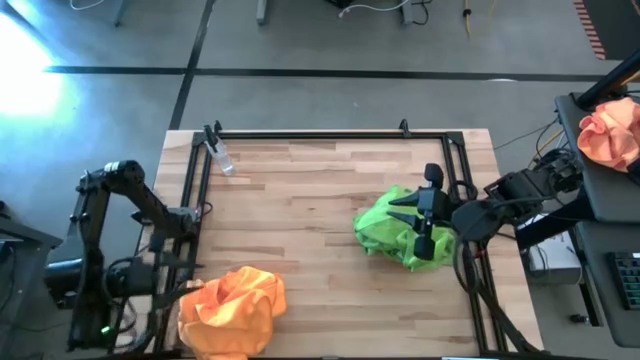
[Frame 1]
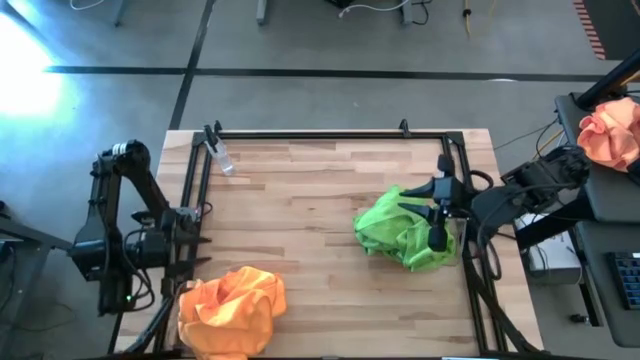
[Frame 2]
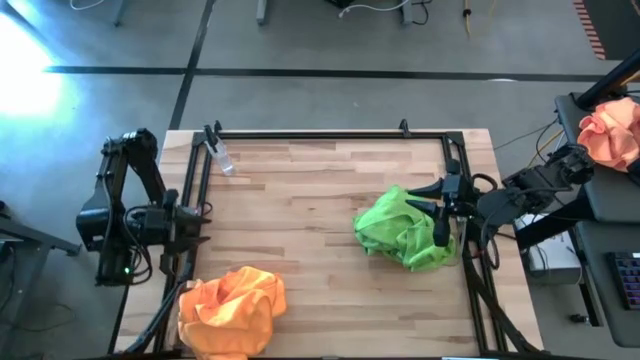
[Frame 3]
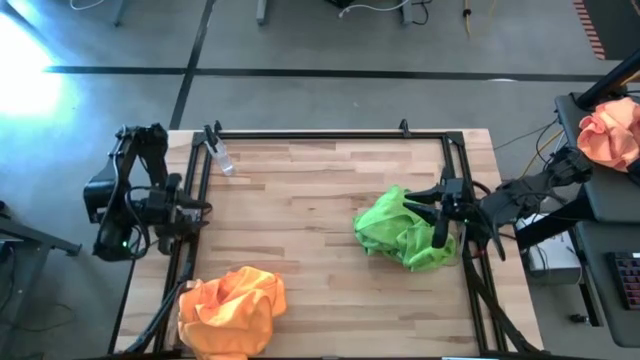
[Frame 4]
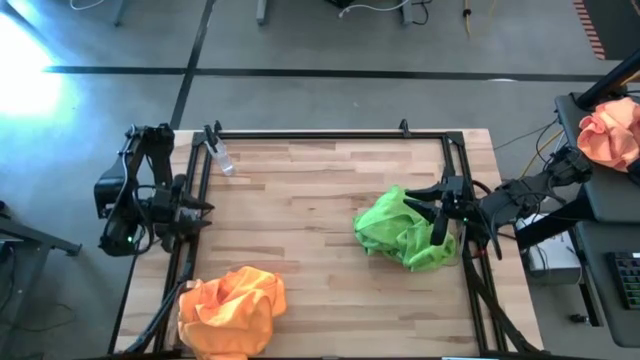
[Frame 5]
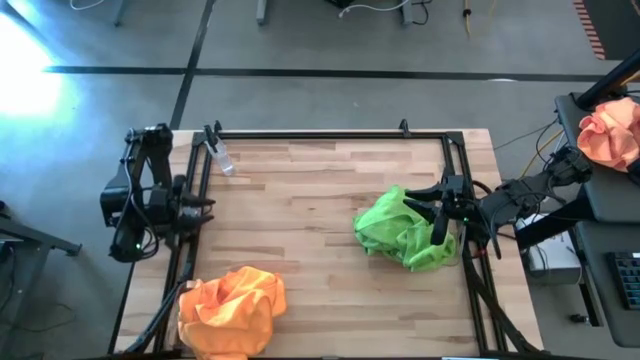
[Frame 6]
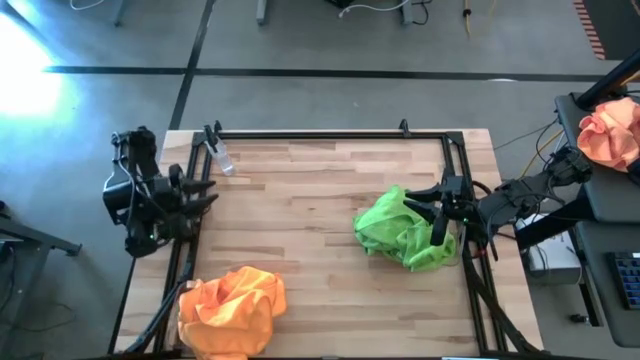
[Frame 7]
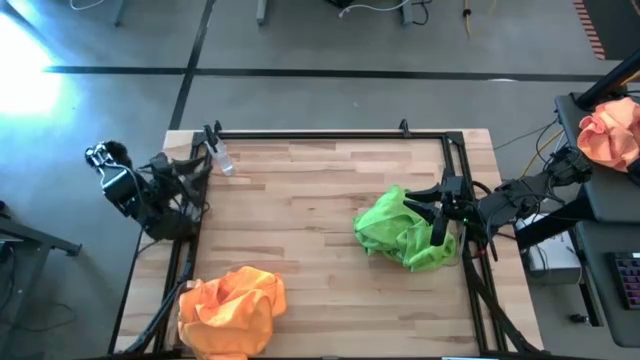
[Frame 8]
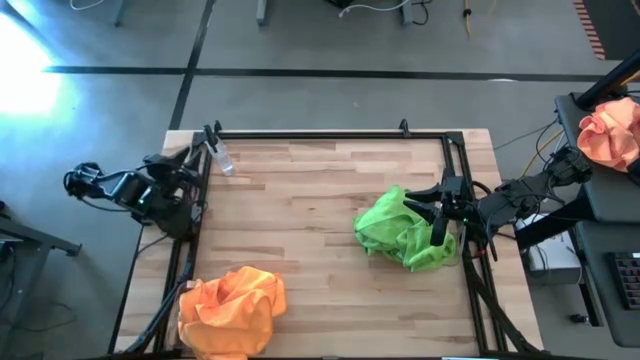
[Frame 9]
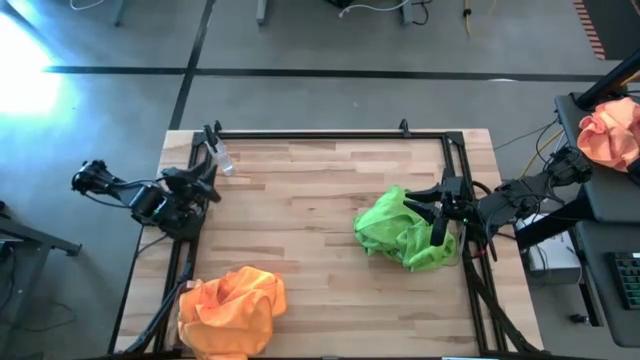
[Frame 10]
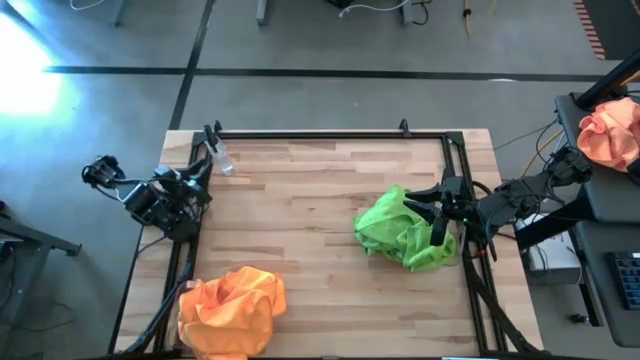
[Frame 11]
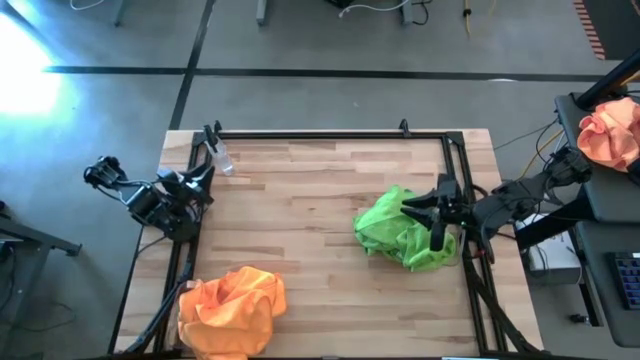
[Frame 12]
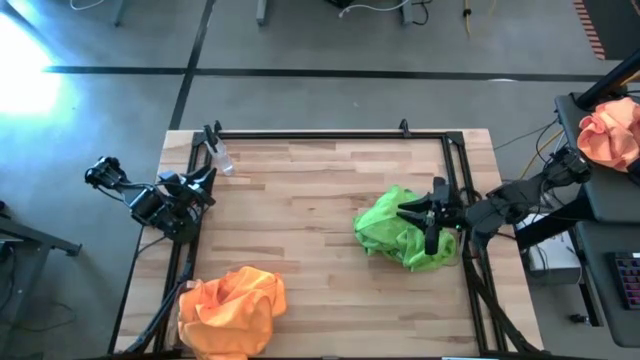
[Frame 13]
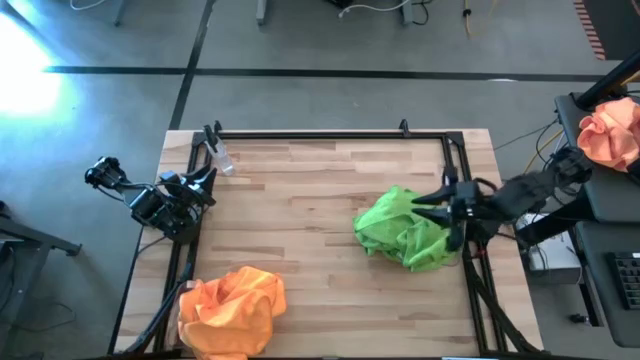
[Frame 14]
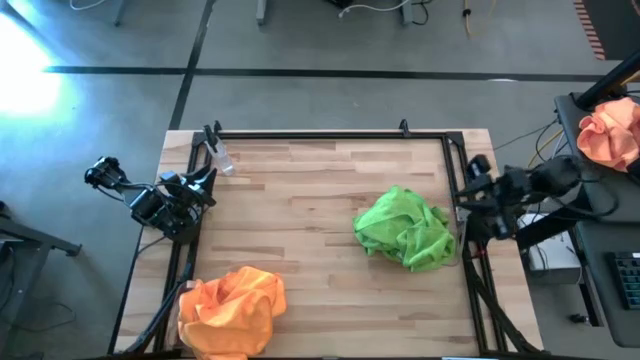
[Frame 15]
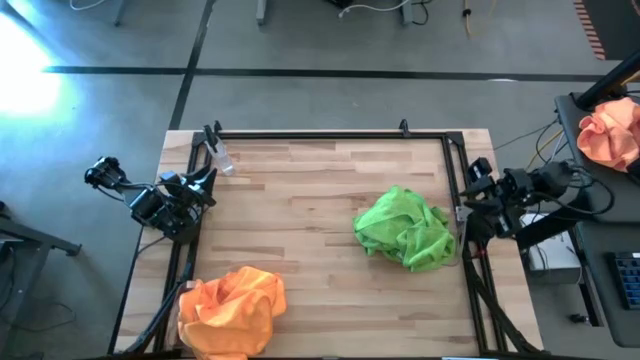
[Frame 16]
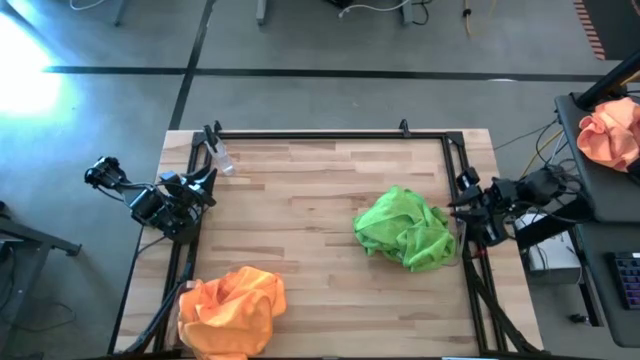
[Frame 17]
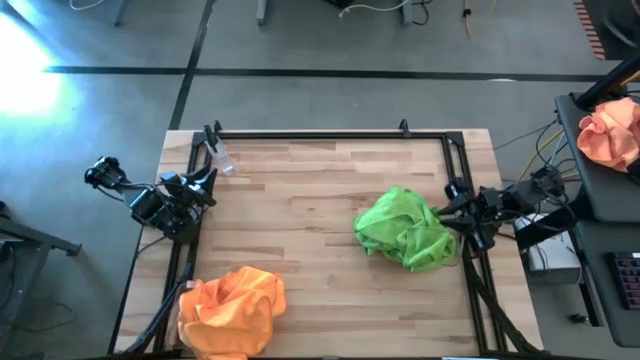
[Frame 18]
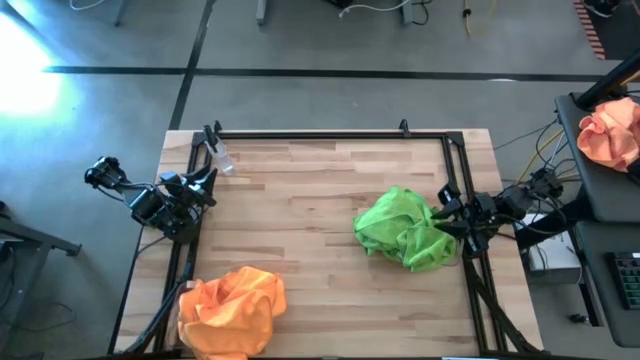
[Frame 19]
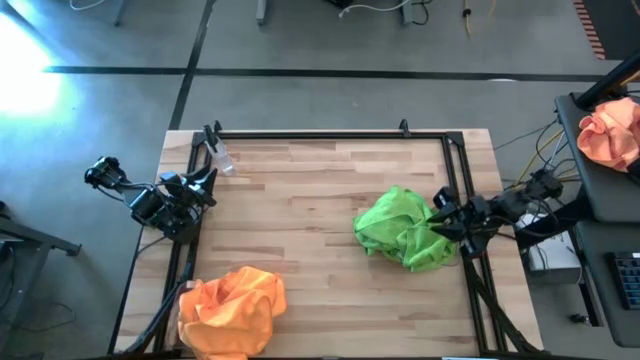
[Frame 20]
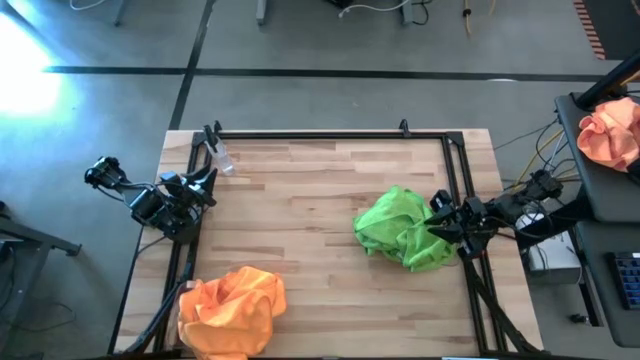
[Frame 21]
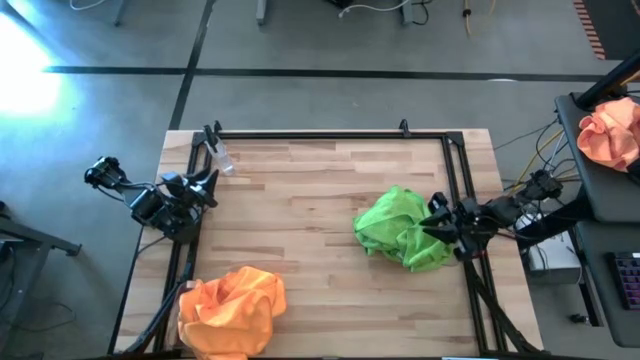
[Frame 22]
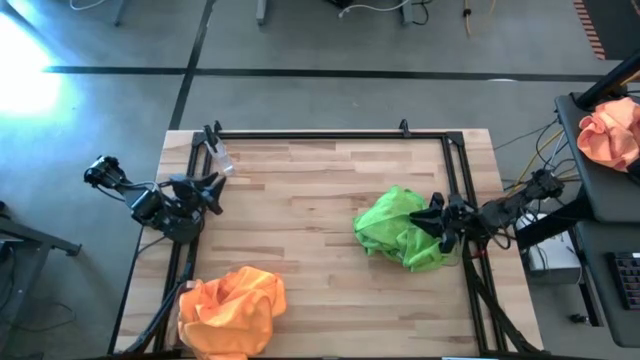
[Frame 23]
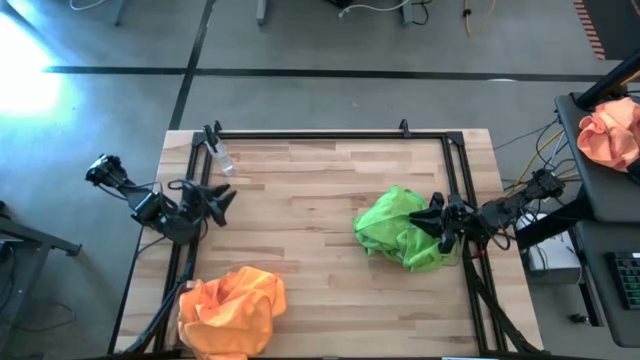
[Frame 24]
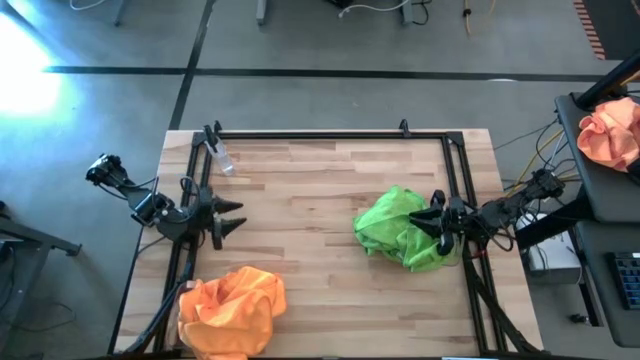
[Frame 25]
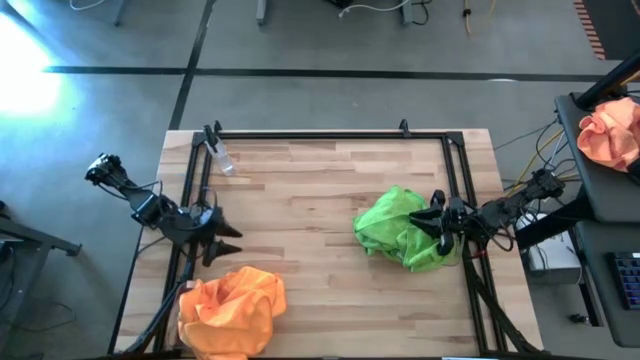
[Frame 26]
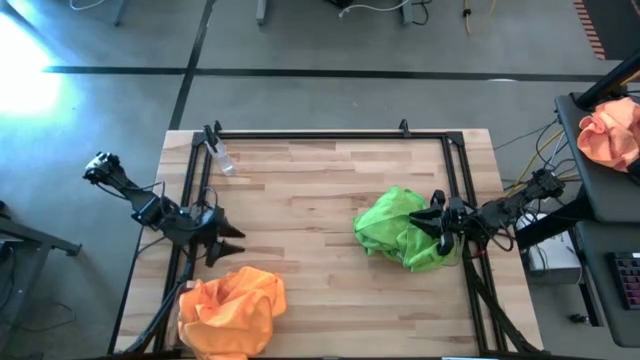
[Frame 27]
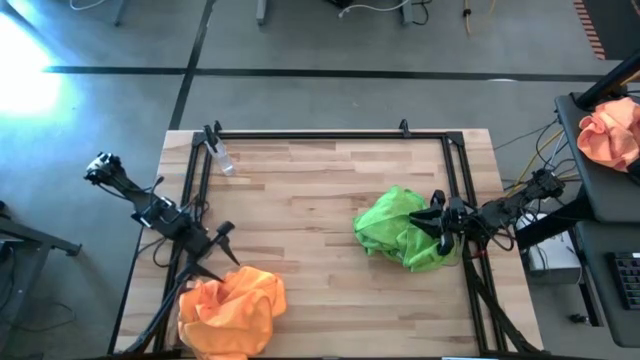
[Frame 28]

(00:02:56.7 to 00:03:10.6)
Task: Sort microfiber towel by color & place in baskets
Return to Home Position

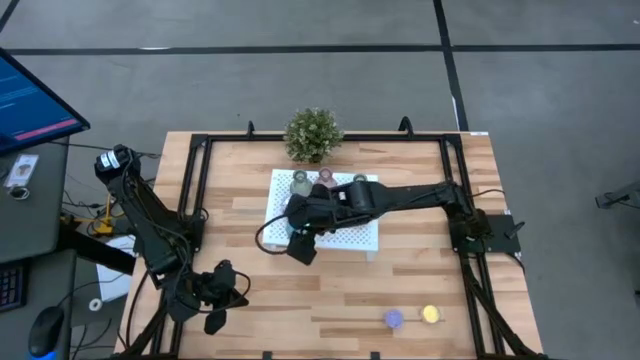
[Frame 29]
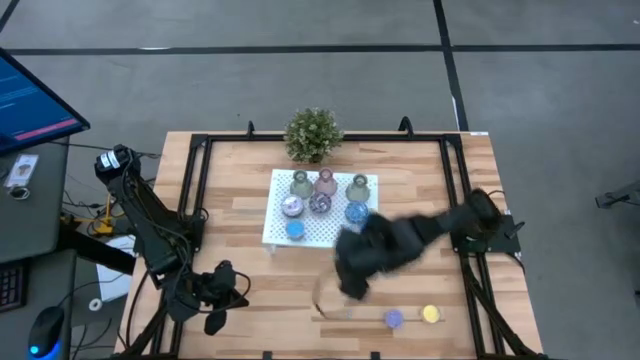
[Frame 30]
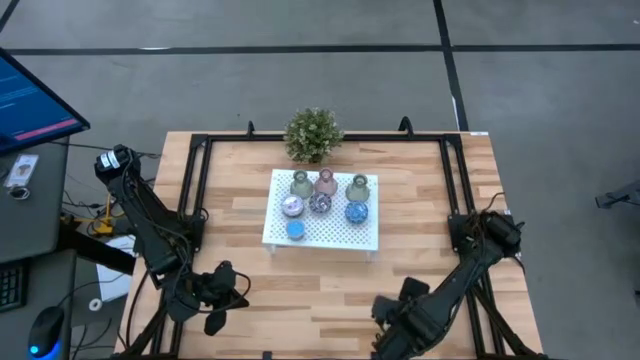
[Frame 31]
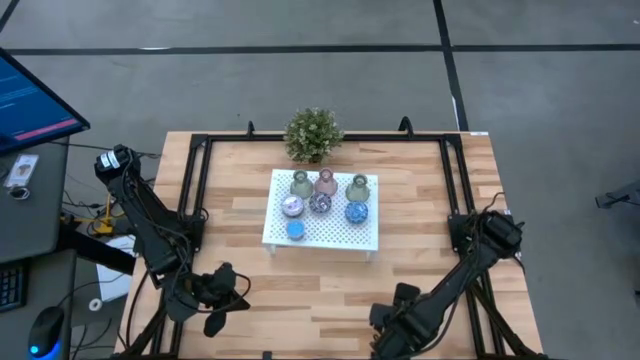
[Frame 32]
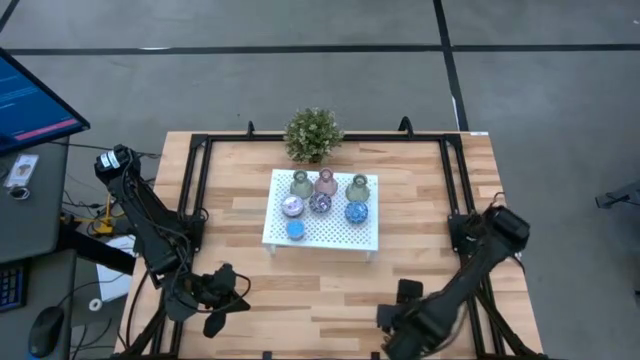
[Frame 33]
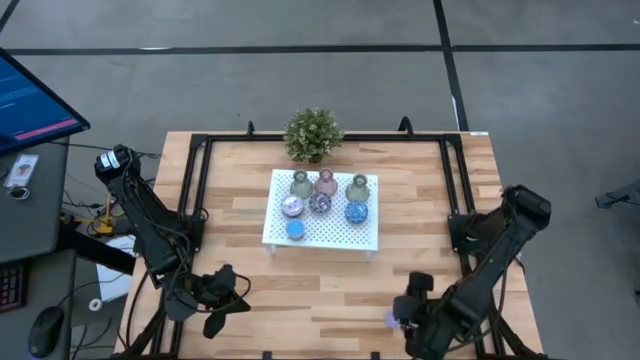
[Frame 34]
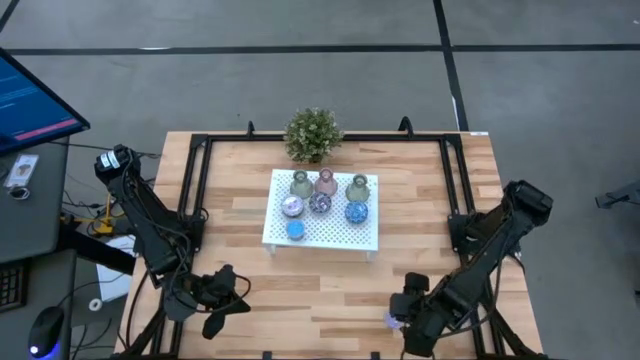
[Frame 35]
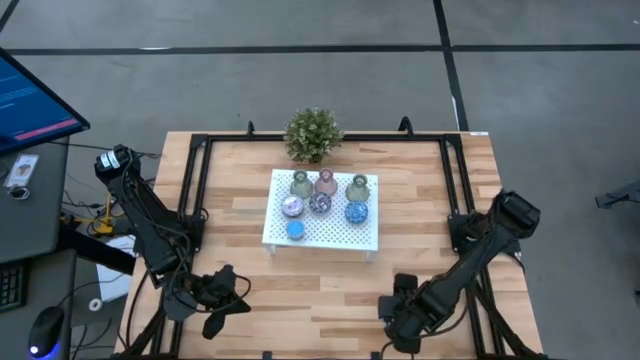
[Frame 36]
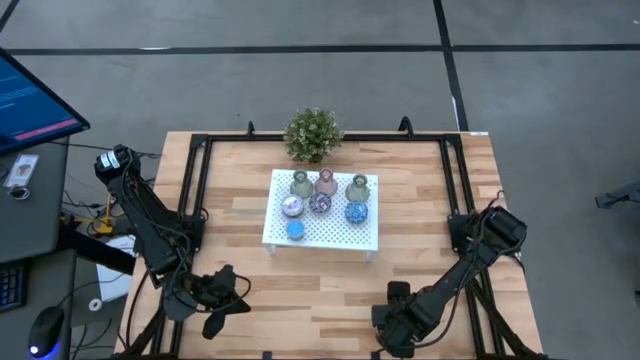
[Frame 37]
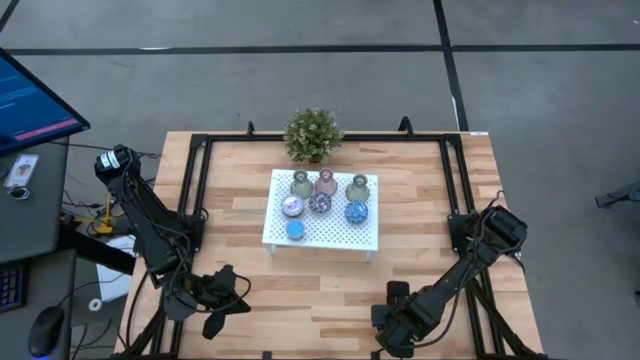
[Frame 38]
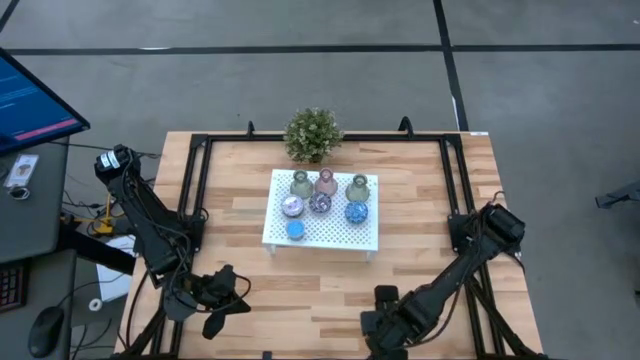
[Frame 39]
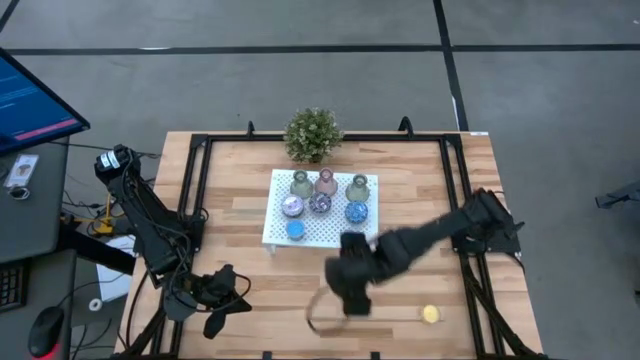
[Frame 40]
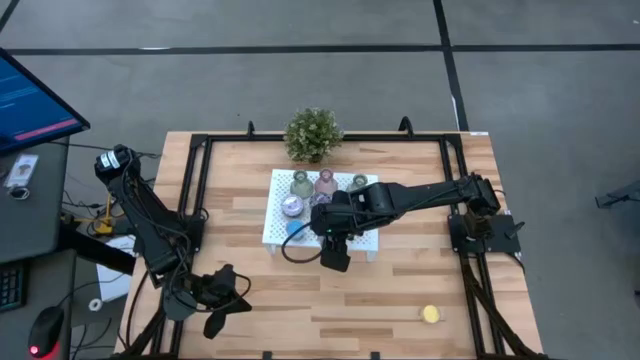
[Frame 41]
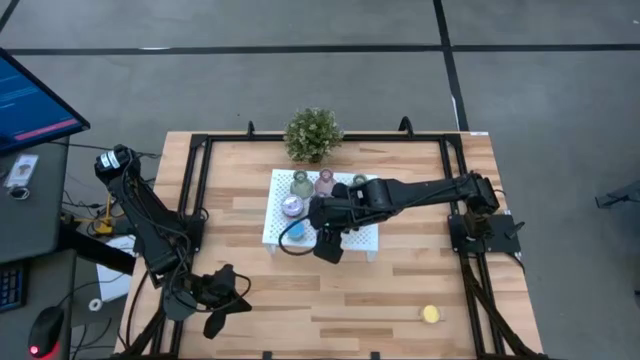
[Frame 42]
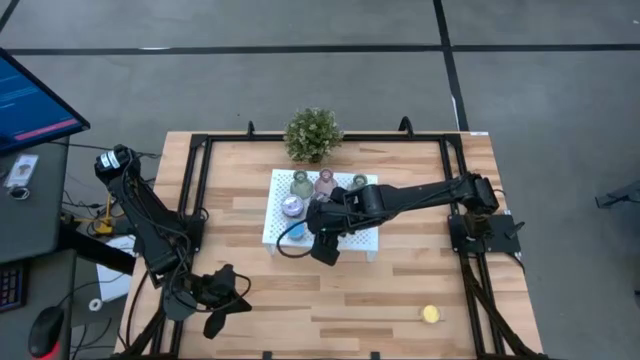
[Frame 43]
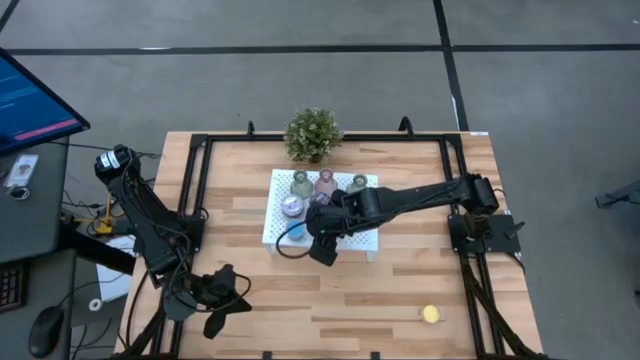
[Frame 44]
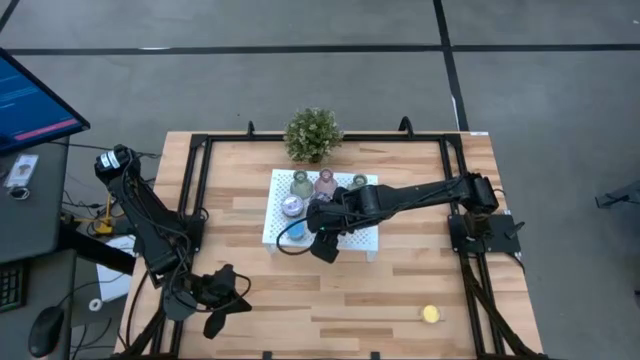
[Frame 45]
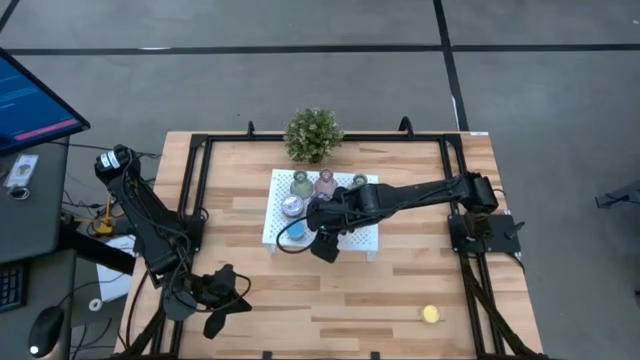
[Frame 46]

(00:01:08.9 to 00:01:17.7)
Task: Pick & Place candle stick holders
Put the violet candle on the shelf
